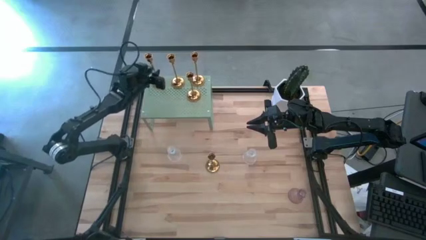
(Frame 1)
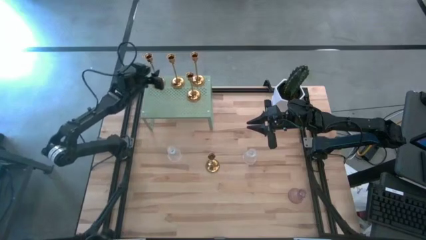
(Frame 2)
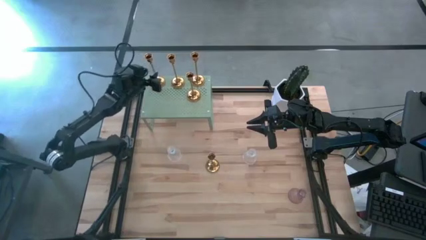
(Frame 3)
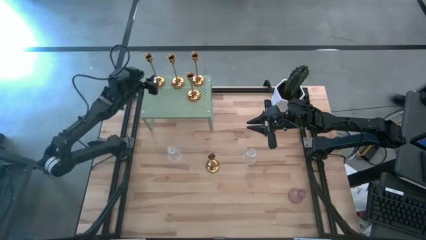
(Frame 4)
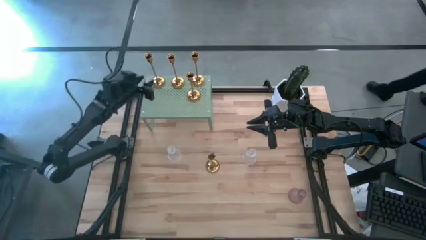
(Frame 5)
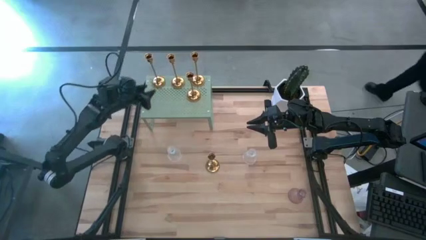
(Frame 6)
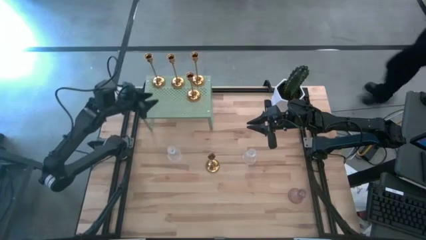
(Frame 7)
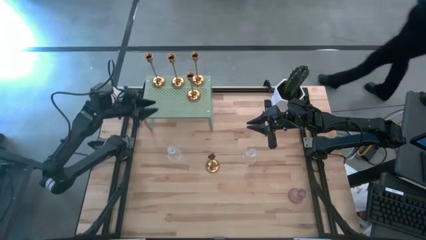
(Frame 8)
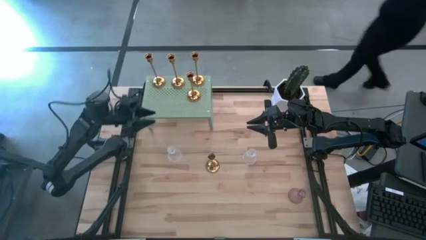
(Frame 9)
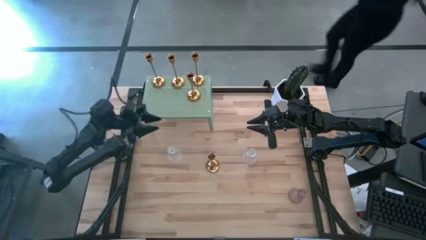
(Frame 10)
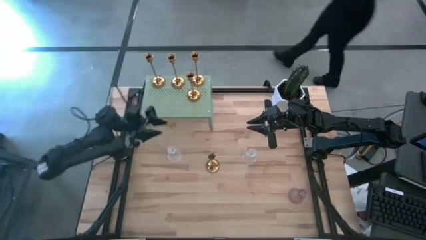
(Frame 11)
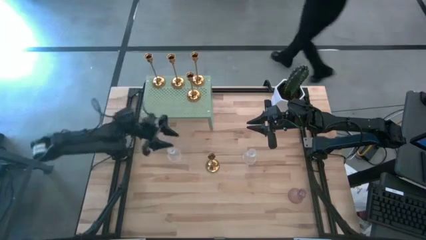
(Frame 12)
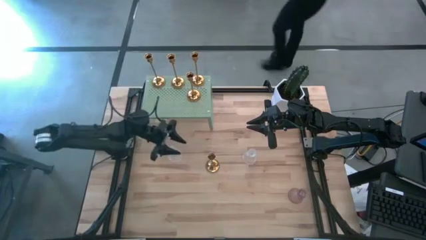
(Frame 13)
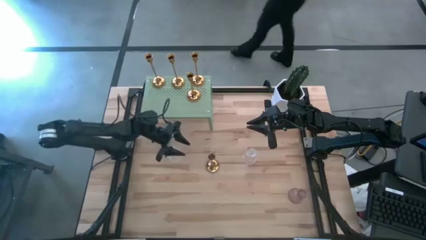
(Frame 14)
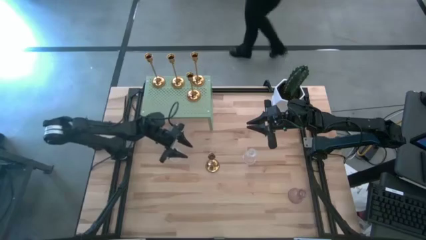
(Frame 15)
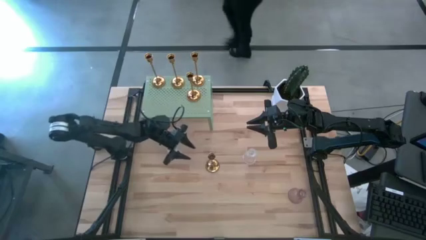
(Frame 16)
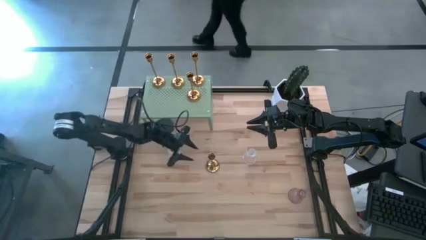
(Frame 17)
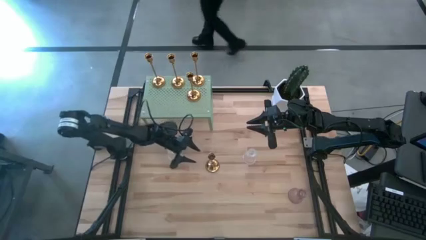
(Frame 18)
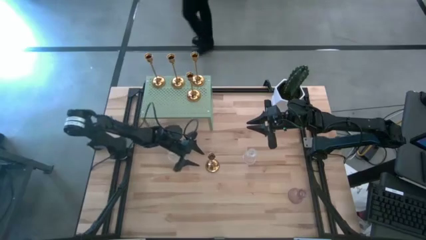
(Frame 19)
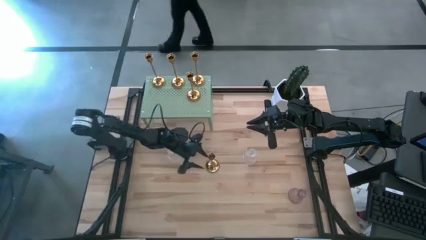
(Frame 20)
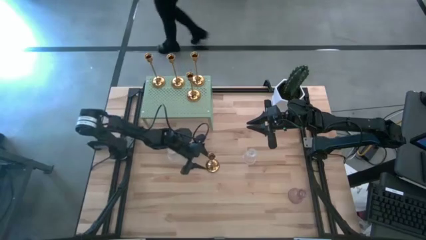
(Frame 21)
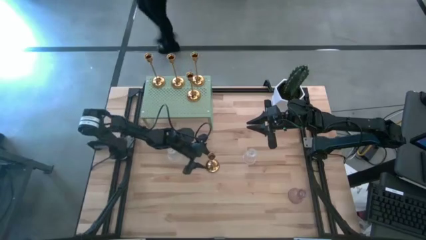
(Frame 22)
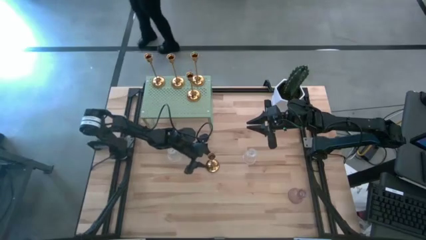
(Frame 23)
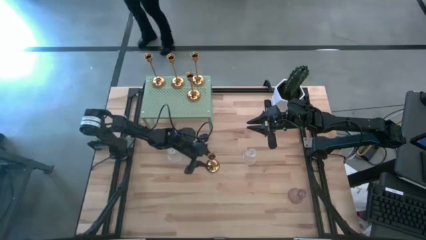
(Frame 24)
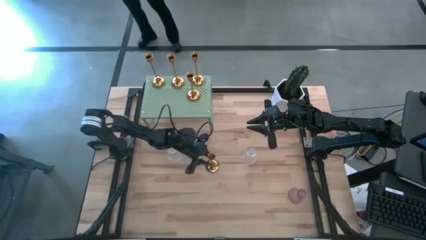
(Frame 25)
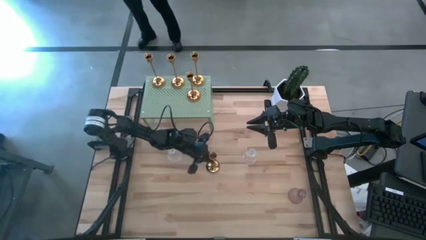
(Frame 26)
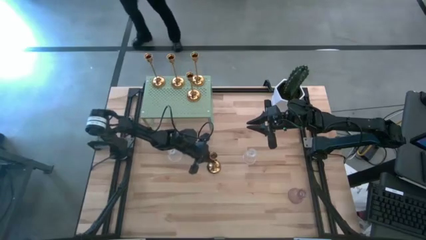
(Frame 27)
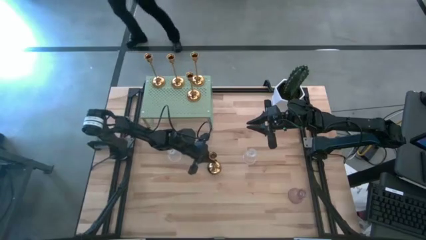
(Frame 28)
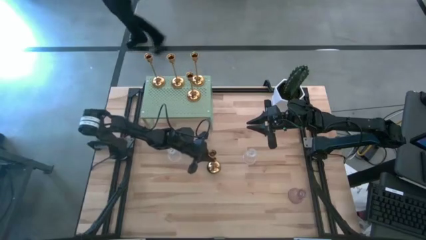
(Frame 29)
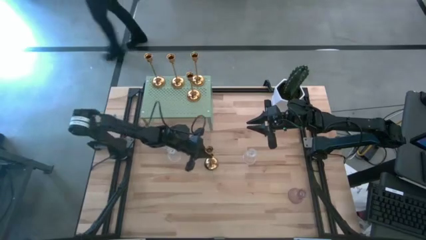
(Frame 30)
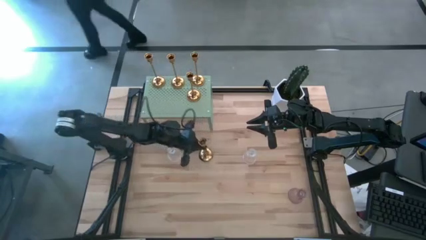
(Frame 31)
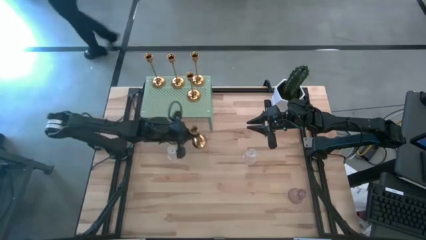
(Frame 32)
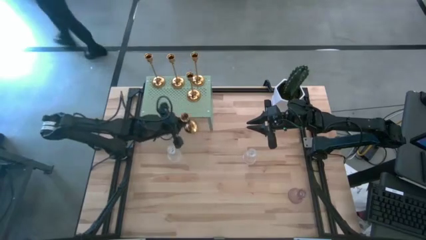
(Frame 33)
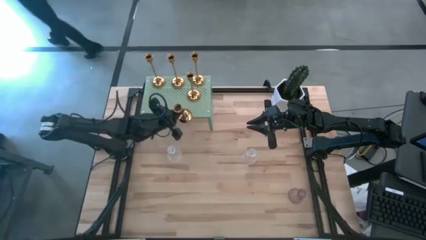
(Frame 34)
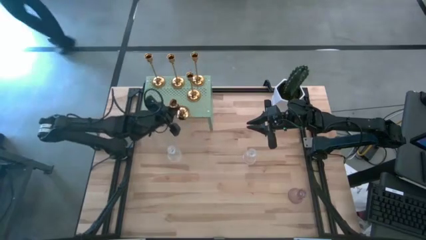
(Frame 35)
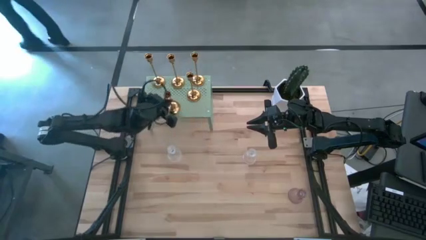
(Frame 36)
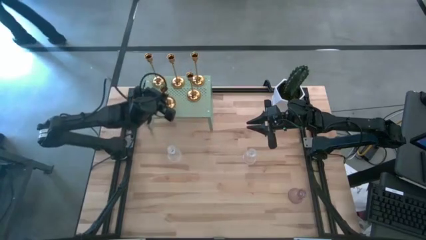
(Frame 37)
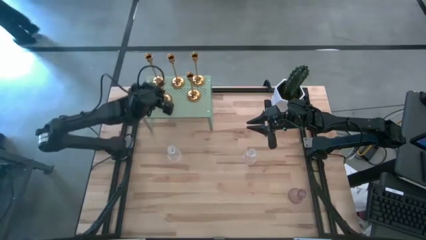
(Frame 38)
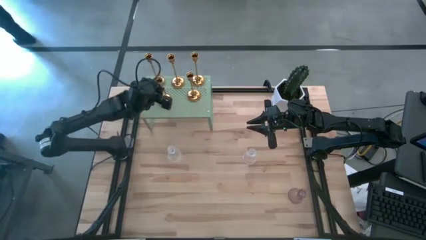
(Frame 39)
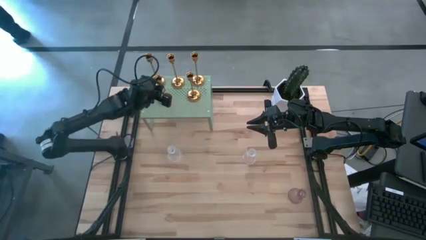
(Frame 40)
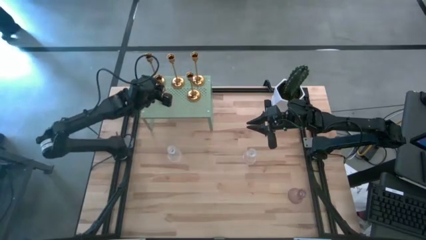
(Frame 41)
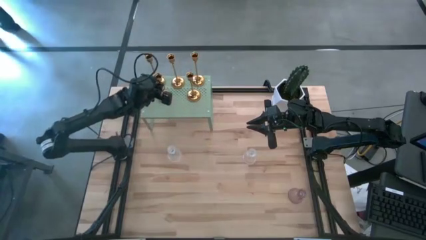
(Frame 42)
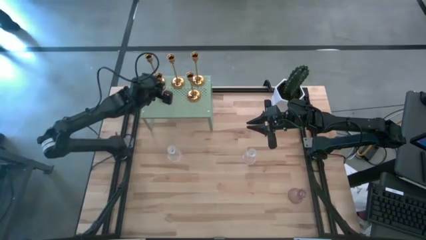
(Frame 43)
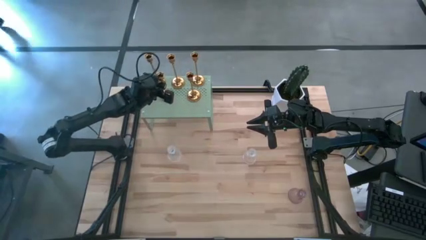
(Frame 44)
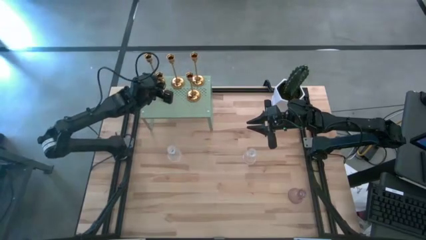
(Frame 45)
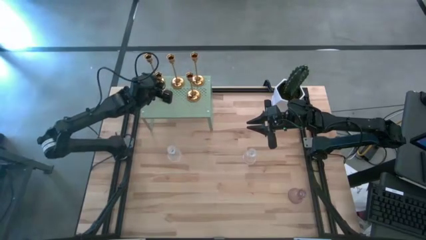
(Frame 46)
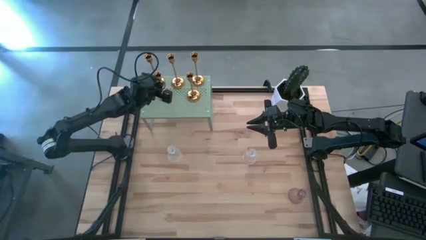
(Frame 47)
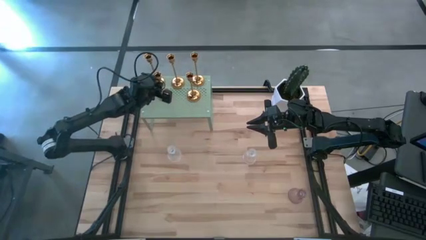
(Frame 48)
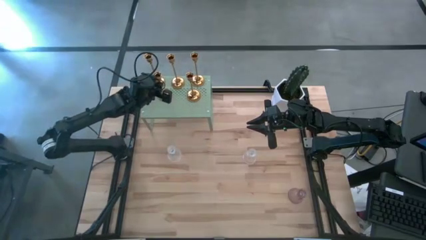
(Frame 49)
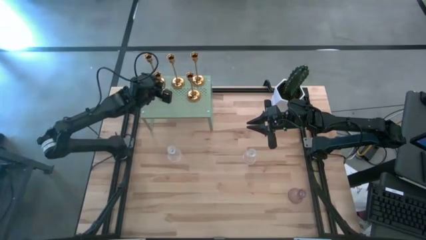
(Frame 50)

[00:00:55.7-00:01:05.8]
Task: Pick & Place candle stick holders
Put the candle holder on the shelf
